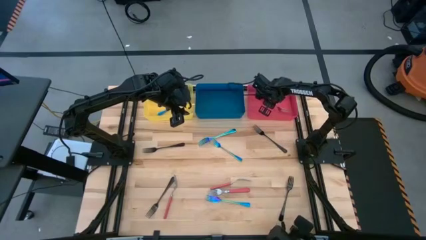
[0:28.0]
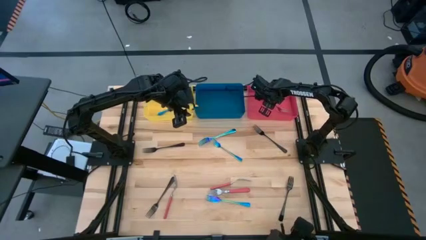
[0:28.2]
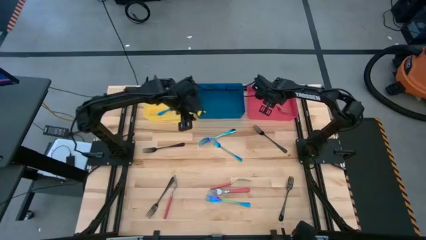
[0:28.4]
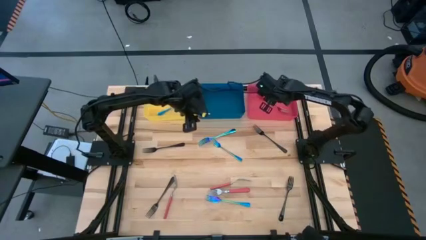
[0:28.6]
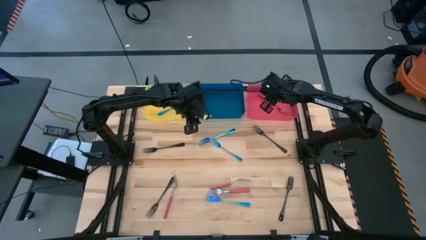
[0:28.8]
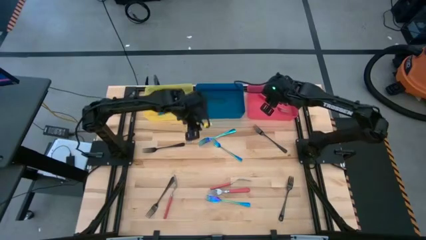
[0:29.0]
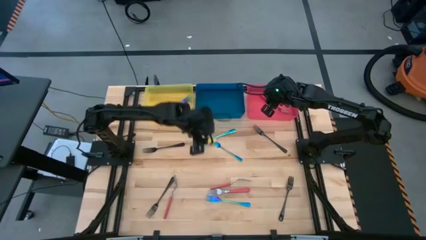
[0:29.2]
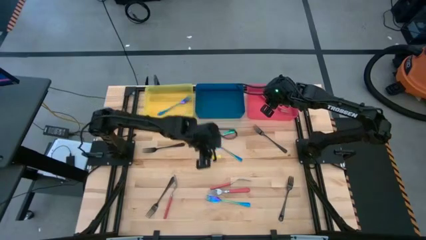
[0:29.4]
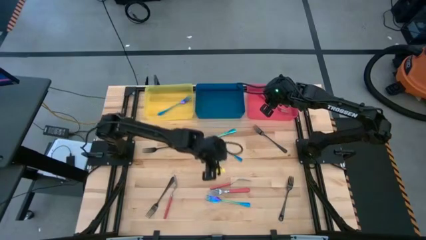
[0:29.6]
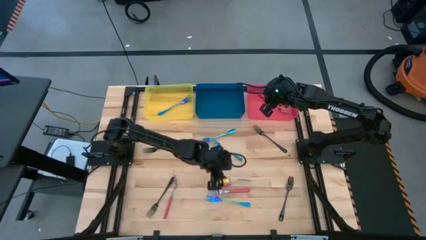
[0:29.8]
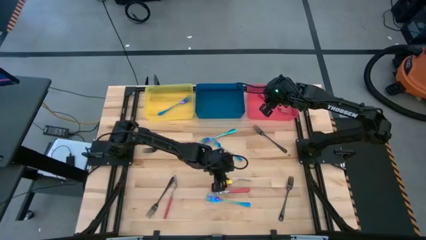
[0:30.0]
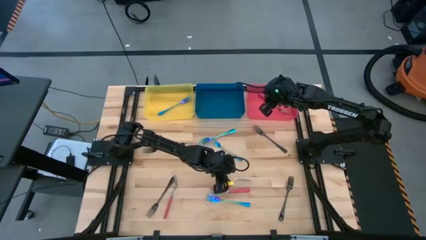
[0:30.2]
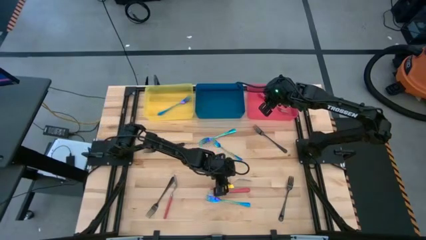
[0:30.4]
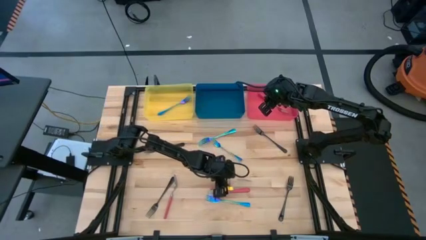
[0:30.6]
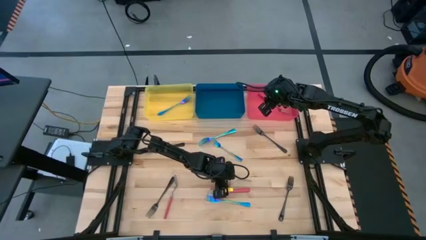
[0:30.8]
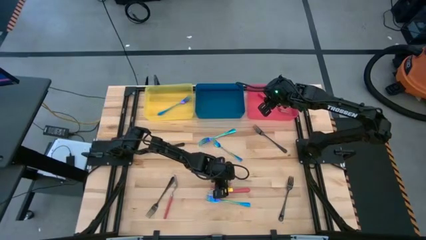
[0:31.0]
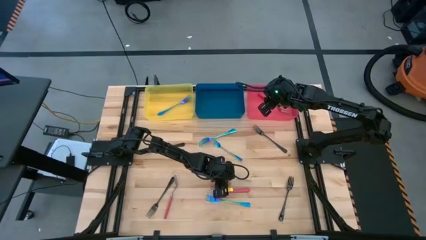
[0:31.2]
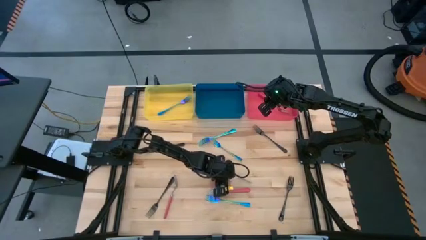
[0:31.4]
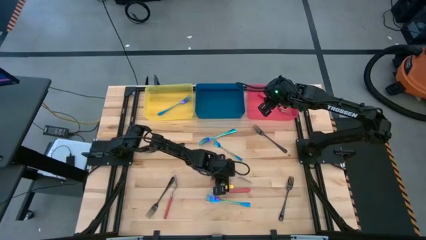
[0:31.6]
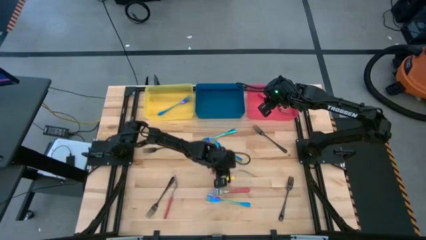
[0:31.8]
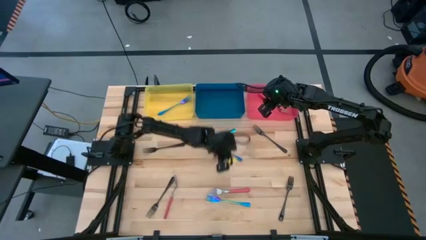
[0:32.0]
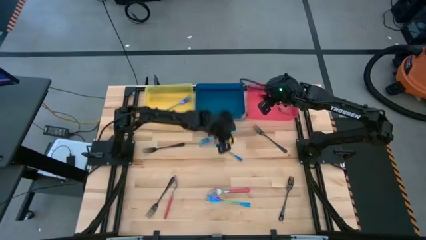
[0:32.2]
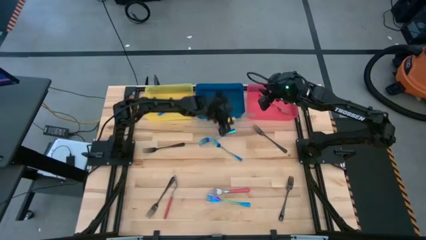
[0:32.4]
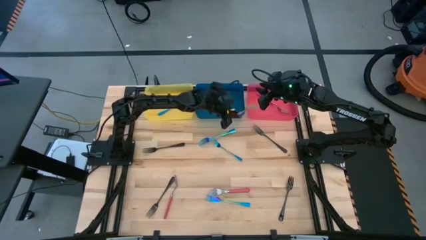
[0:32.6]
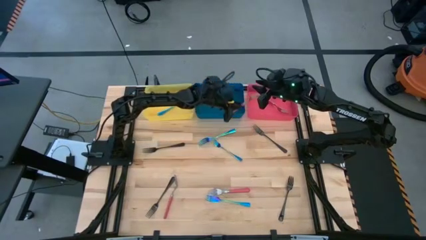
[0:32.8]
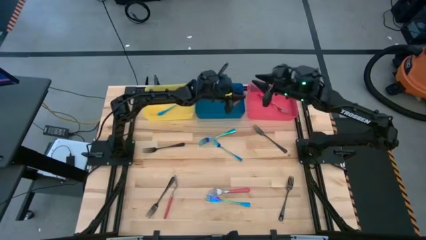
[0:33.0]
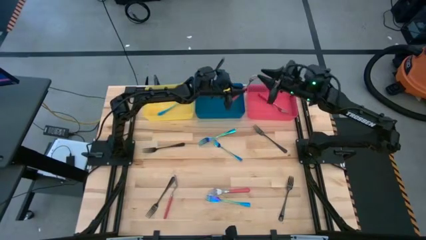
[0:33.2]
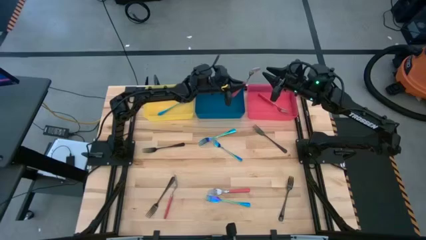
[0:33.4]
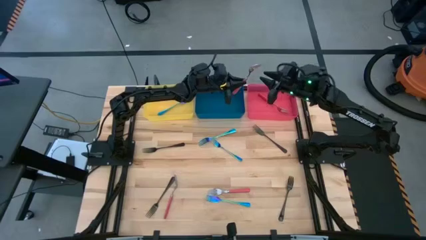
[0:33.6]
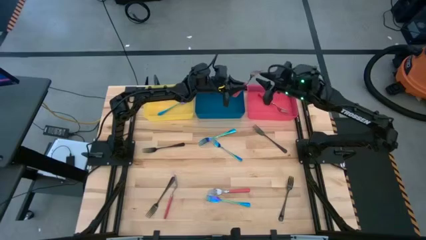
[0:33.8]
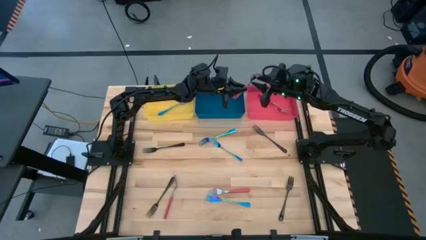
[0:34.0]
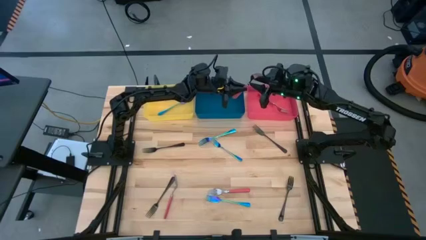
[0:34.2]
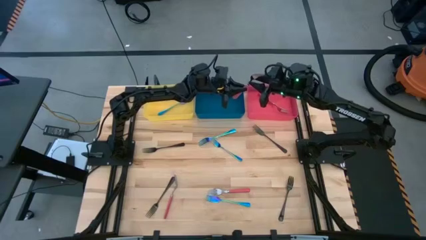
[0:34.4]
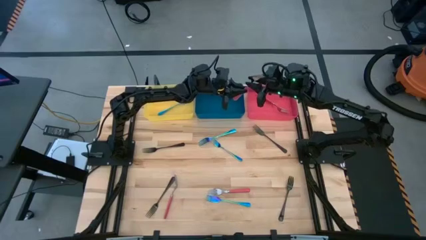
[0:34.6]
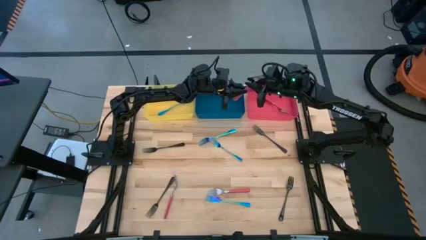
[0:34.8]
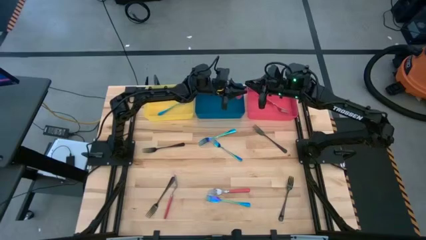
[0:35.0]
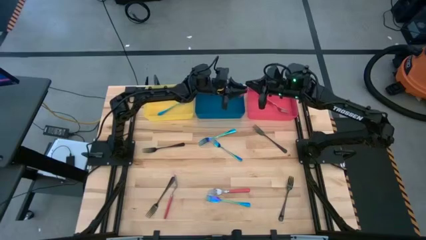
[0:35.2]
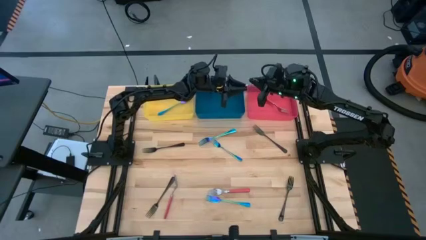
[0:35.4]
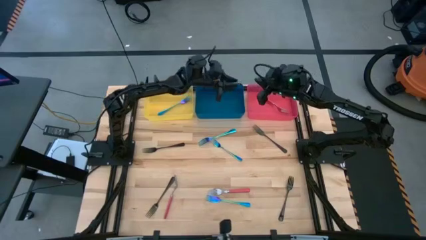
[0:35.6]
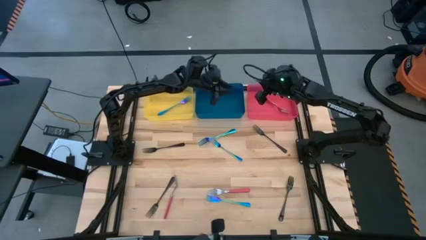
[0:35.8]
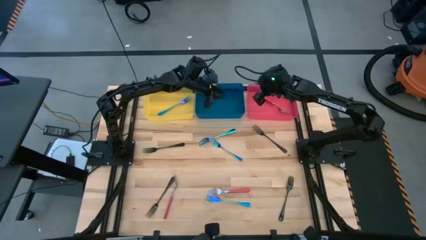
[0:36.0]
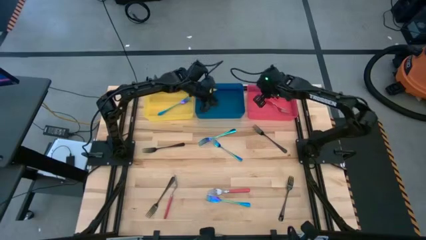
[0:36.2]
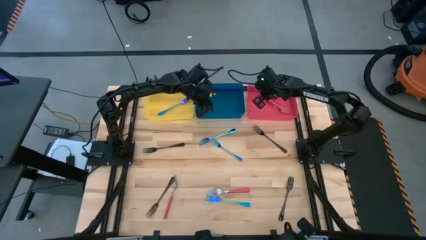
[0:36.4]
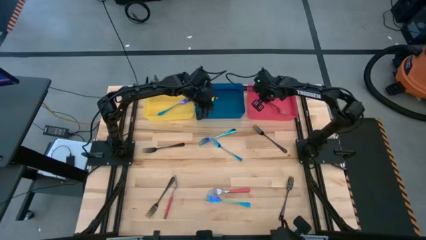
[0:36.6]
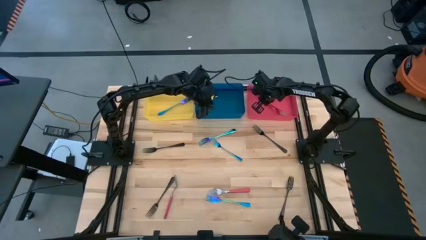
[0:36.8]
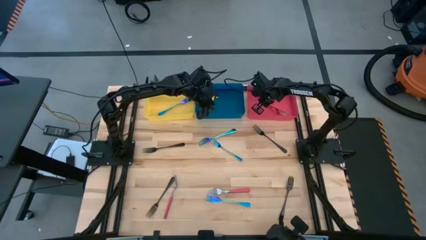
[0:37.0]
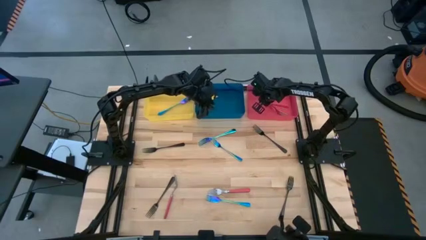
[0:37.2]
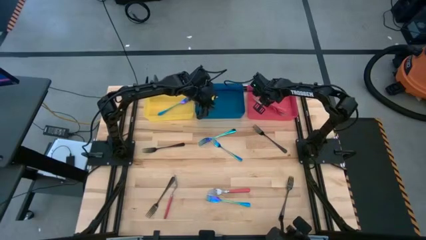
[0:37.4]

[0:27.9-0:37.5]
Task: Sort silverware by color (type)
Put the pink fork into the pink bin

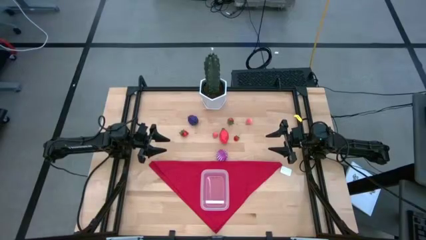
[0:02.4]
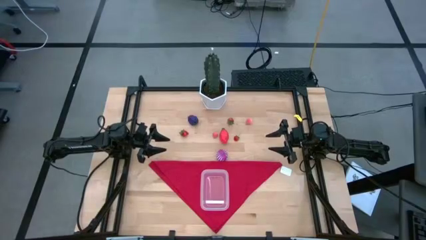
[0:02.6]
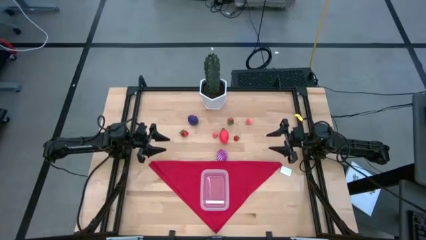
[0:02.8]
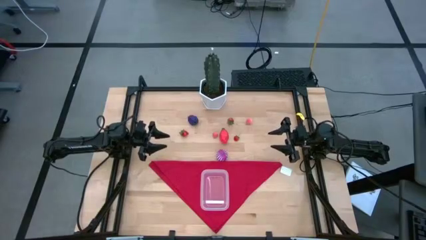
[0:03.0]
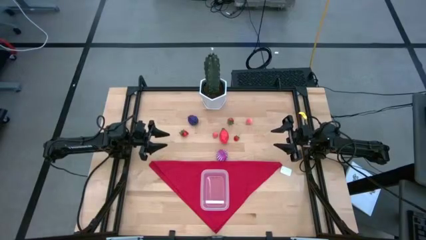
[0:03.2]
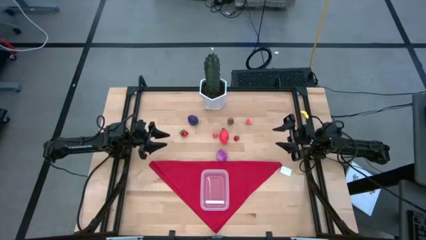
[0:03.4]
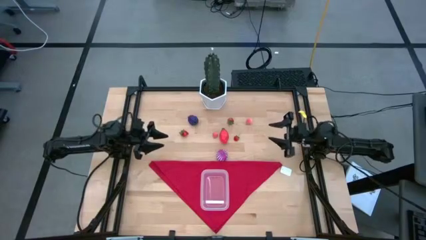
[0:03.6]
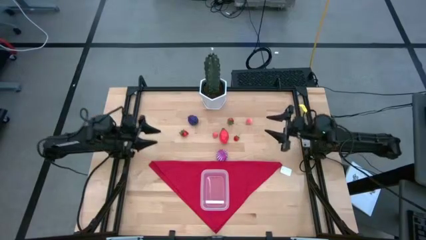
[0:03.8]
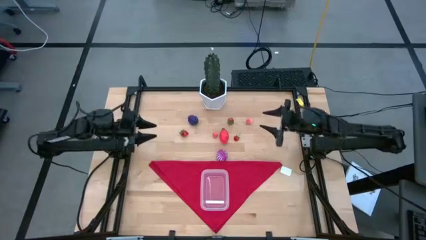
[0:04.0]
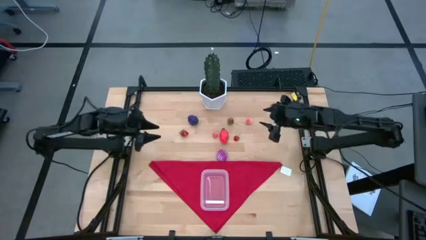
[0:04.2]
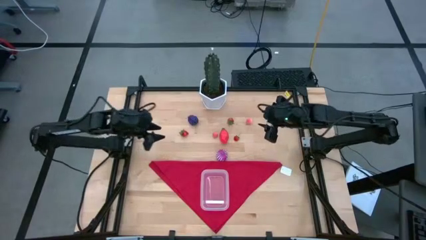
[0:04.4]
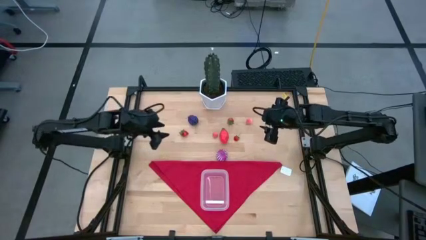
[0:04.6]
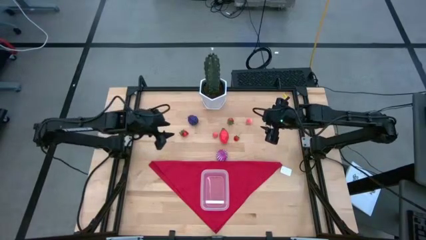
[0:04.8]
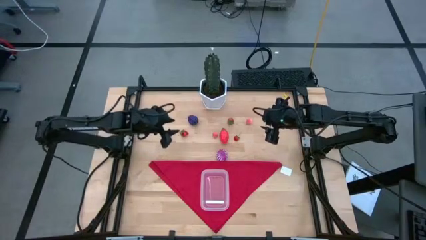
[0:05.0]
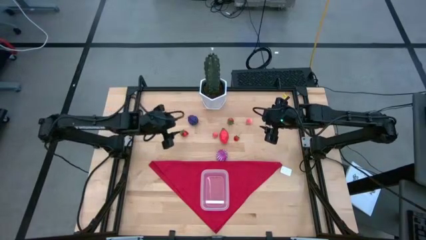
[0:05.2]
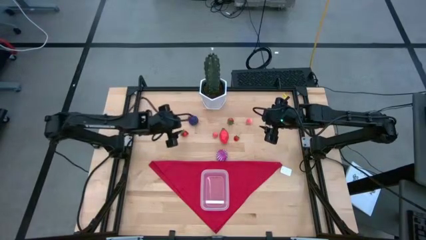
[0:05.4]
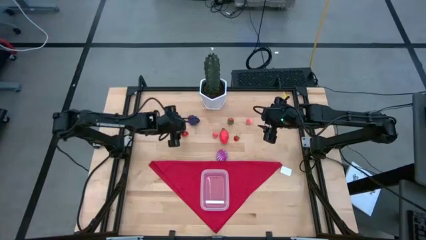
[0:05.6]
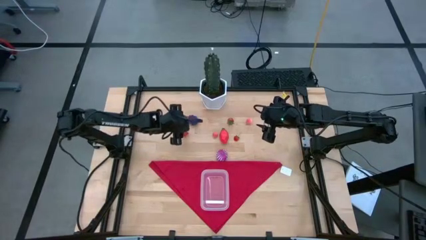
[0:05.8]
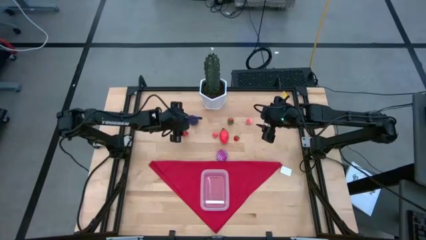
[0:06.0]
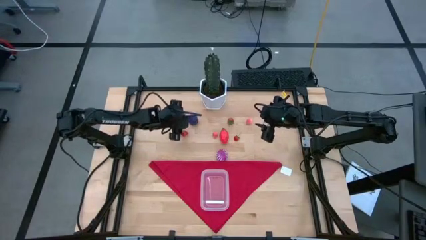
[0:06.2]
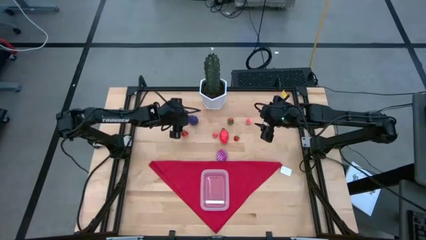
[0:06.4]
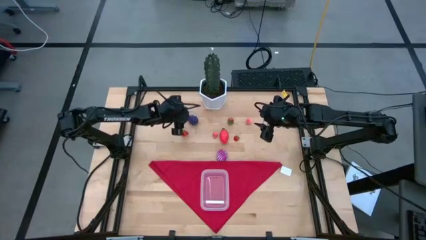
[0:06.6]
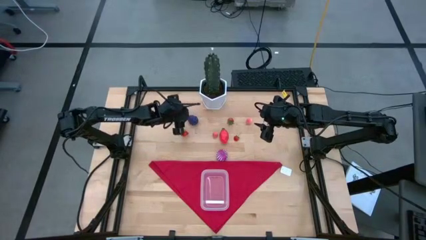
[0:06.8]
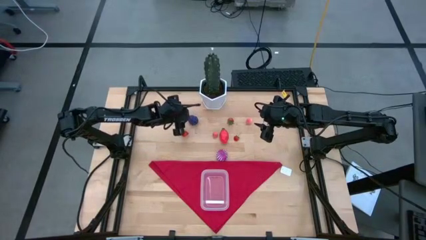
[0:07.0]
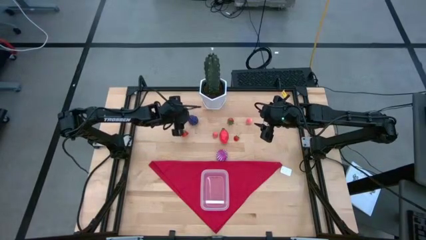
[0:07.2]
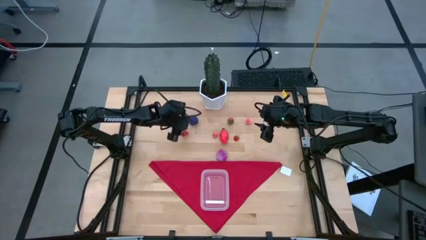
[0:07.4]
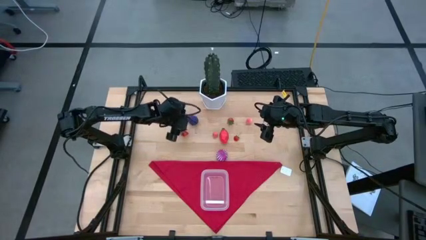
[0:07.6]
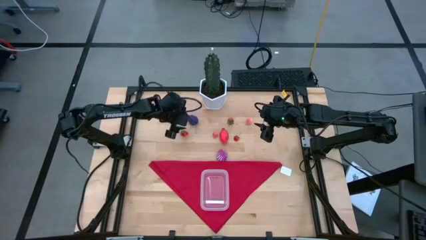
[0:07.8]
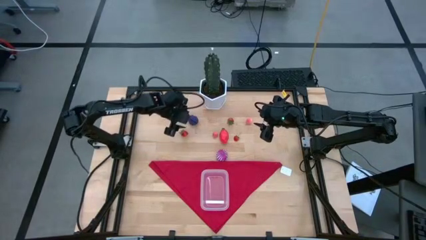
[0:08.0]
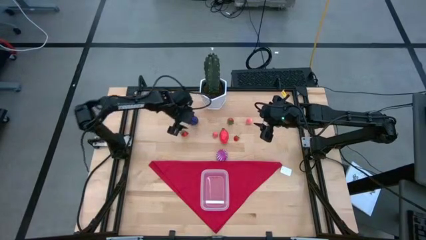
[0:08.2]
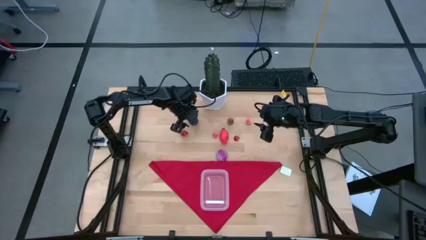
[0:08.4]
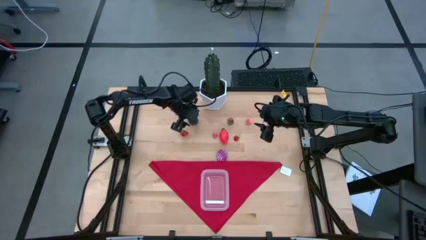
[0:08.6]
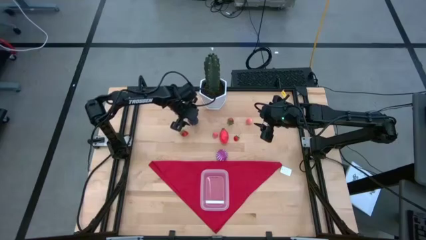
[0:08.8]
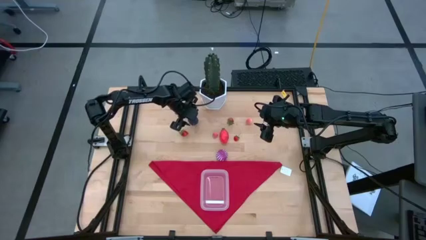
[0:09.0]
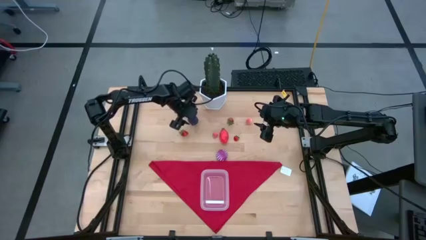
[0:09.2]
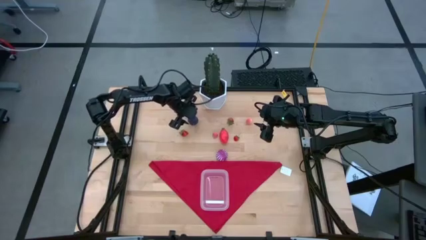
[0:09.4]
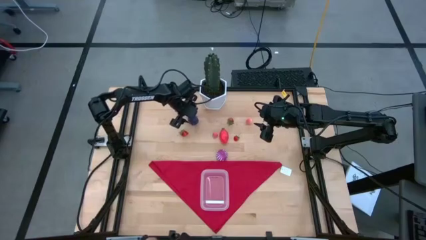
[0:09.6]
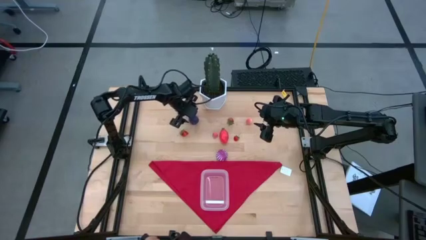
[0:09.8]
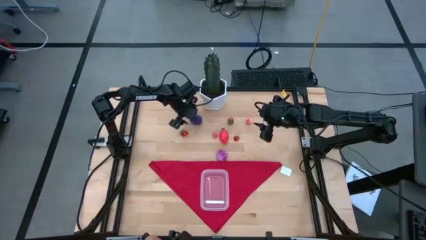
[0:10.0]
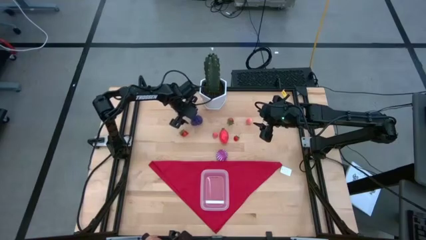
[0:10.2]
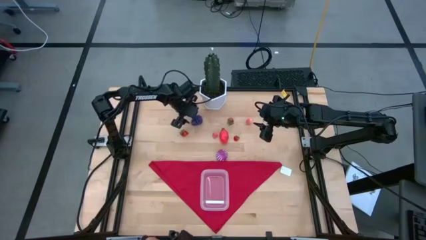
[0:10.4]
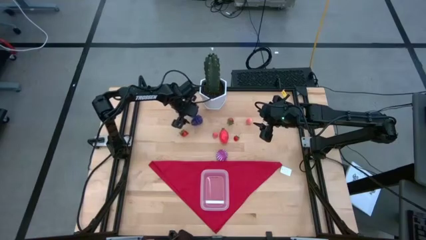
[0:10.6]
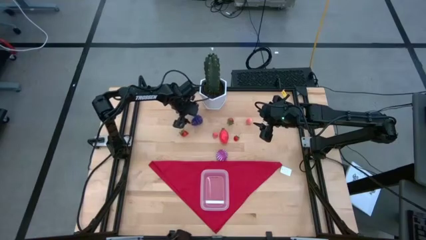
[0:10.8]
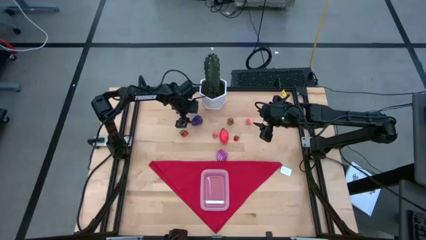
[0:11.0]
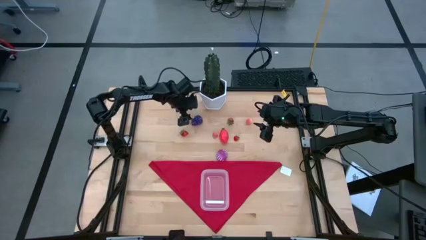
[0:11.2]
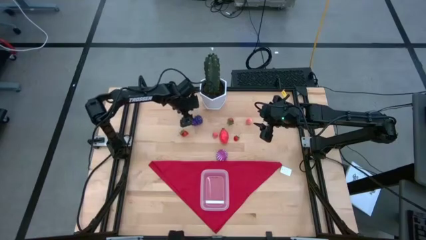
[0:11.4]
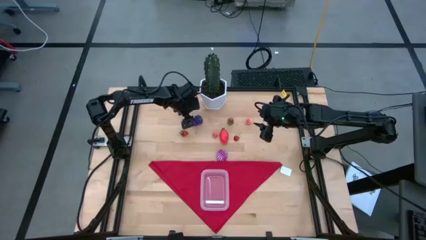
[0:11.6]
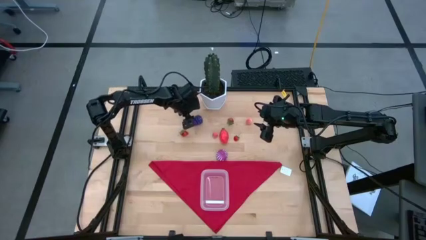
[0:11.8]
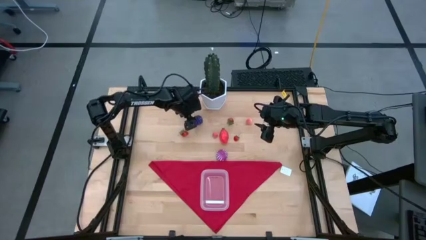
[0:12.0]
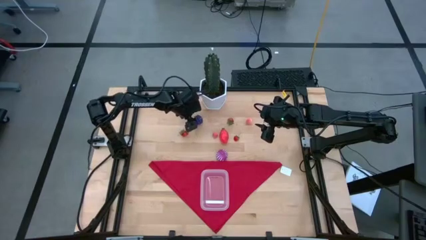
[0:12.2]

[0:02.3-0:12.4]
Task: Pick and placing Produce into tupperware
Put the blackberry into the transparent bin
